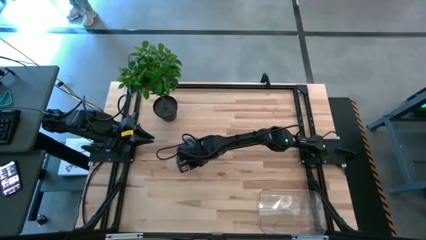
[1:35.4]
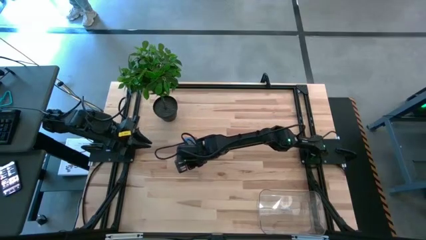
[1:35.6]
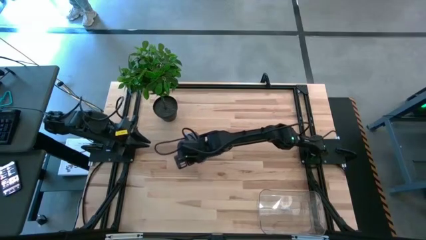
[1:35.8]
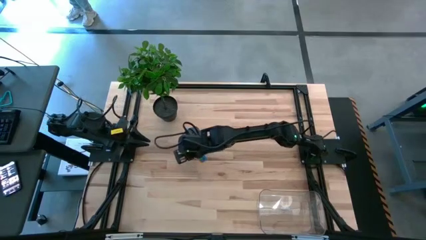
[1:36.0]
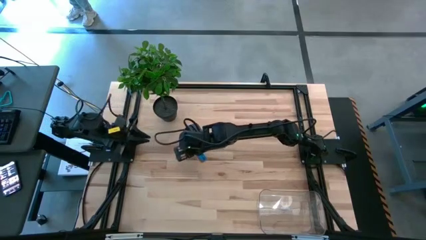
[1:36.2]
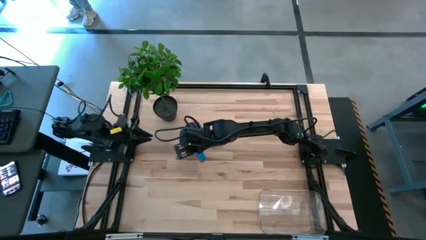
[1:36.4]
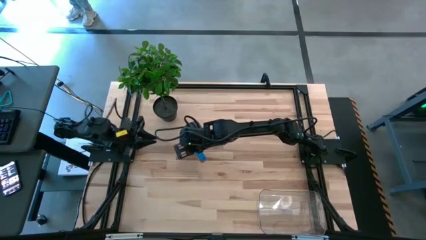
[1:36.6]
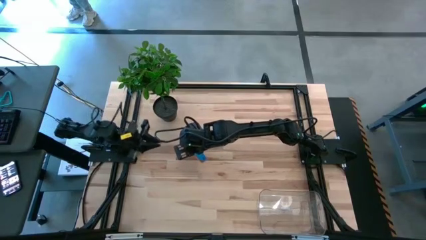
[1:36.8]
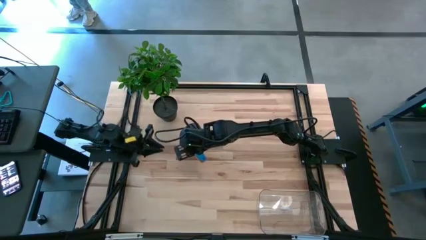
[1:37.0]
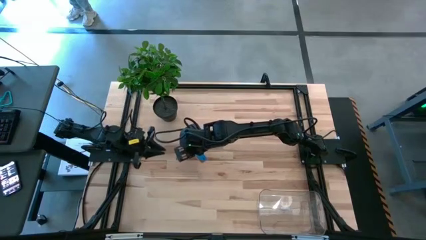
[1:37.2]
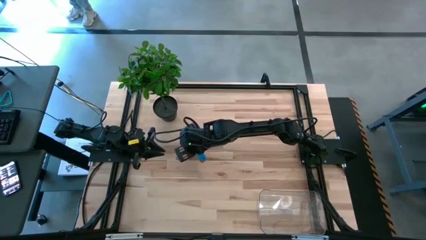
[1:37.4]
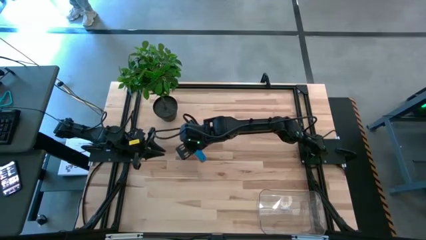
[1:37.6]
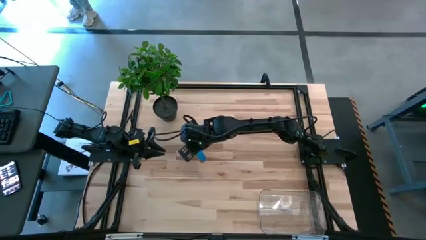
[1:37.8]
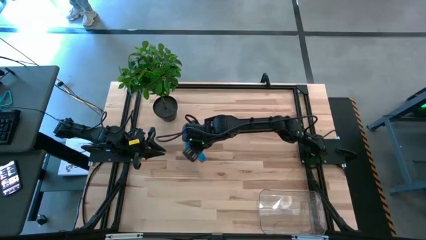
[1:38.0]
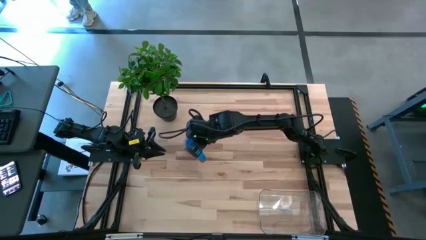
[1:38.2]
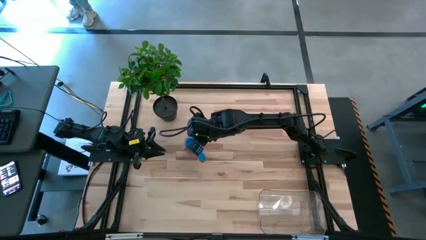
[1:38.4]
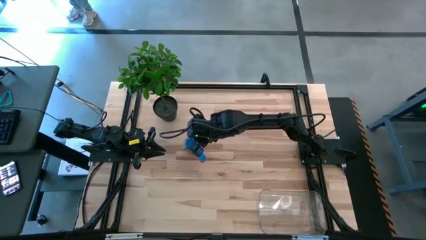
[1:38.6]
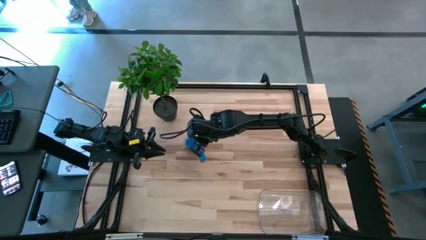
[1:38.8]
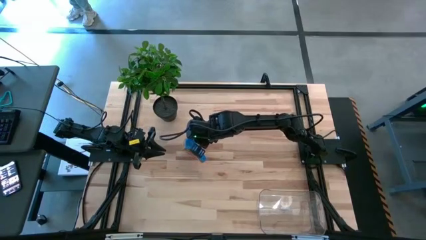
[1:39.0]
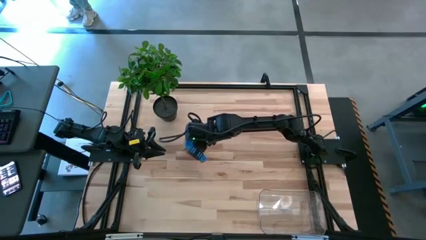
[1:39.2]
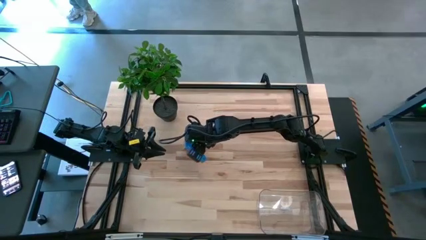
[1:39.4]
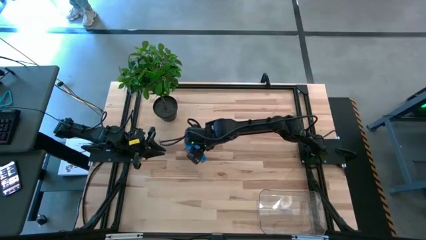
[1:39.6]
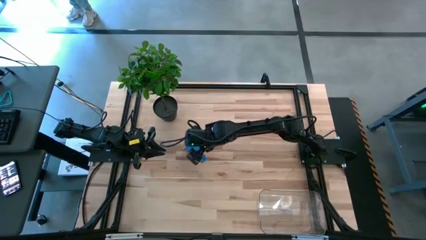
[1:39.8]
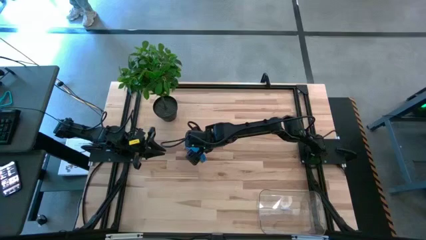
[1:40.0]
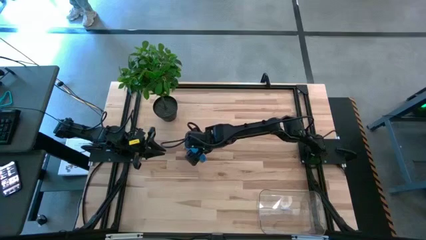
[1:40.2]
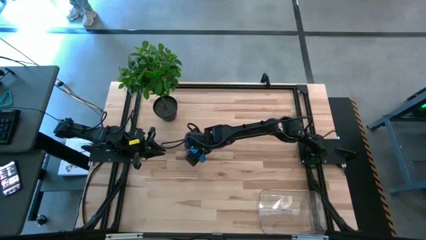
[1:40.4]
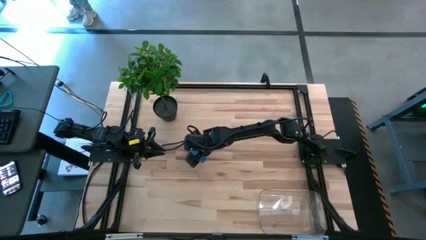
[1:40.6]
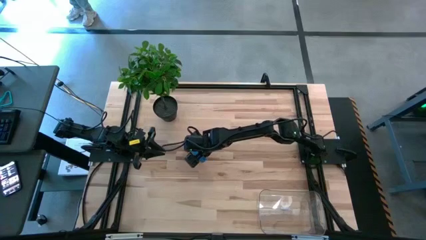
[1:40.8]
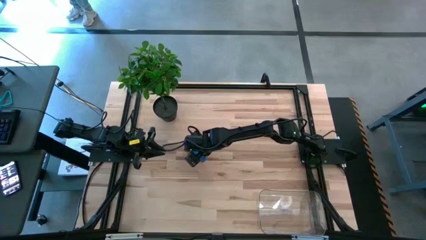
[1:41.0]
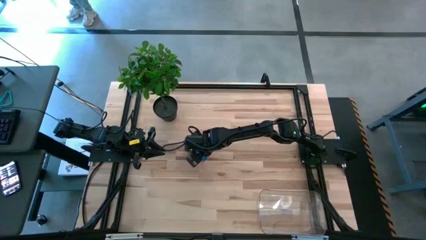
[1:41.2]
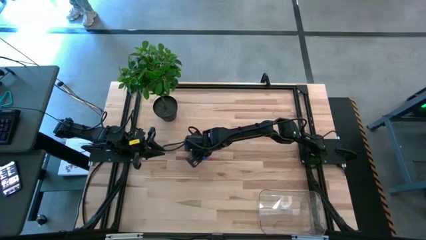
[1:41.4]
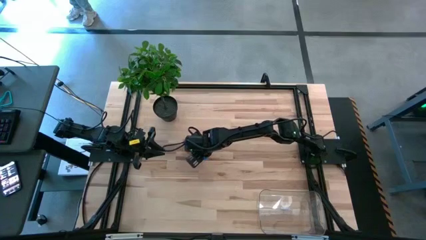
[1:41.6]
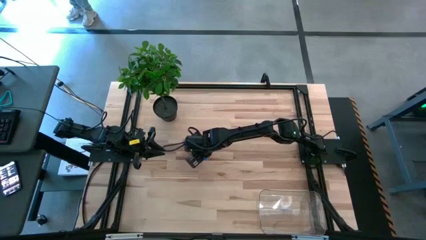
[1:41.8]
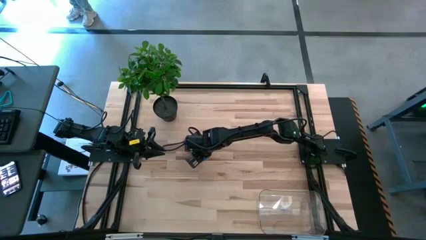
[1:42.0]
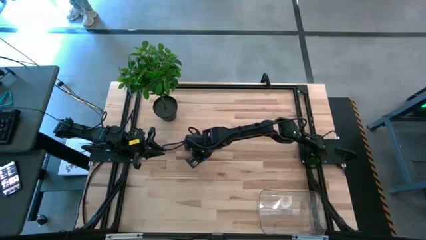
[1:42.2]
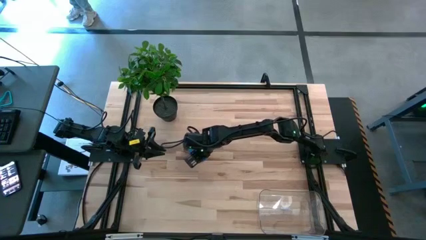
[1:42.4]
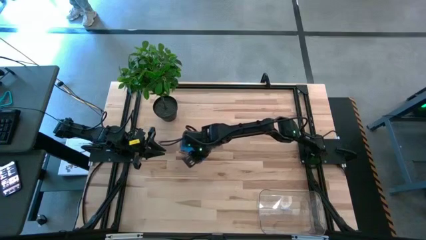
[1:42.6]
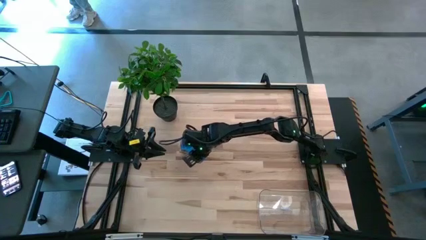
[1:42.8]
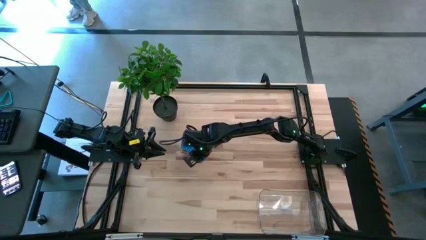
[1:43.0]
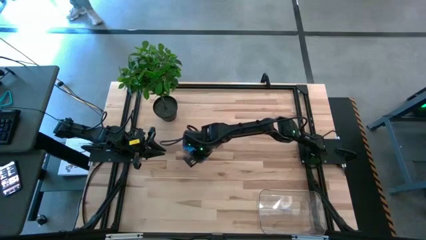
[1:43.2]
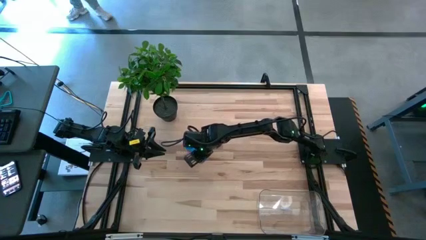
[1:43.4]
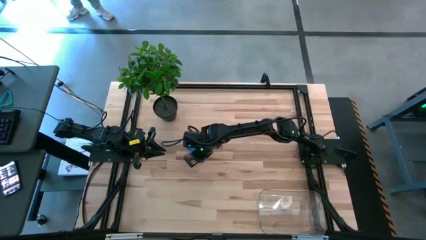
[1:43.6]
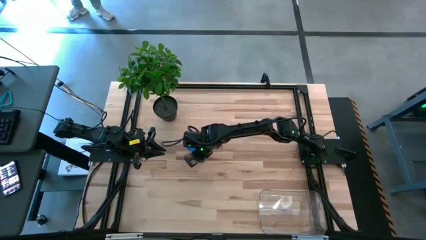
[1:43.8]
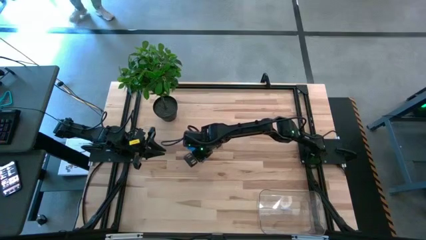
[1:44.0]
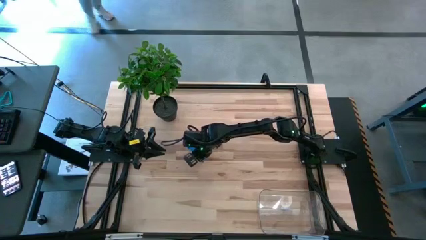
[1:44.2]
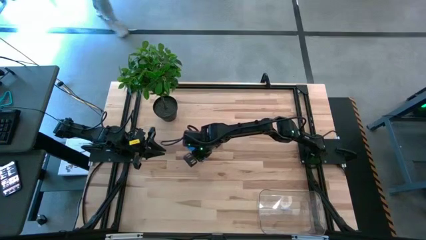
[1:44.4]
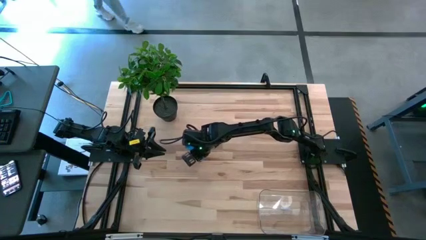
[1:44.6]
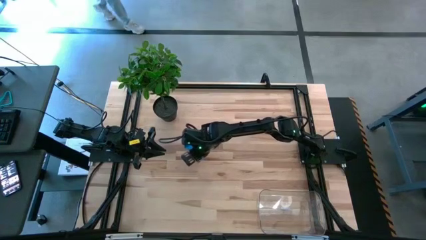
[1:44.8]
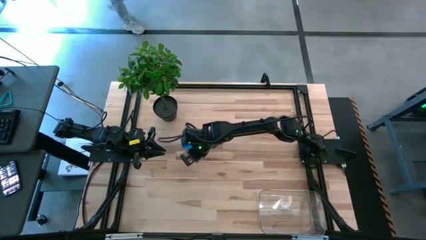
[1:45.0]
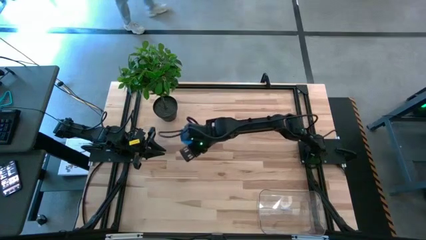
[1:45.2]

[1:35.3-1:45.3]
Task: Nest measuring cups in basket
Put the stacked measuring cups into the transparent bin
